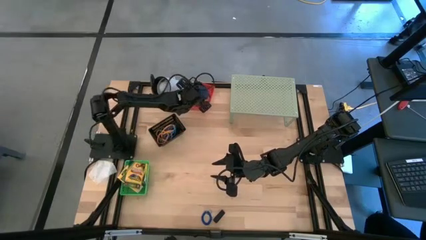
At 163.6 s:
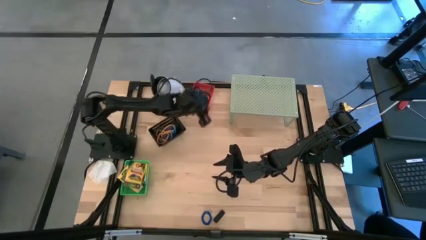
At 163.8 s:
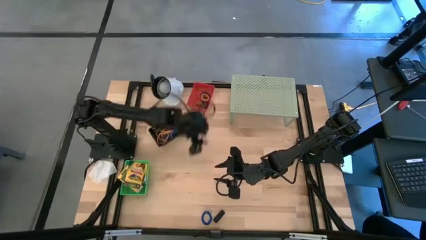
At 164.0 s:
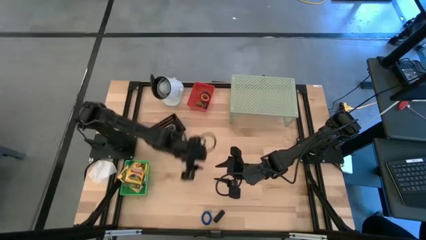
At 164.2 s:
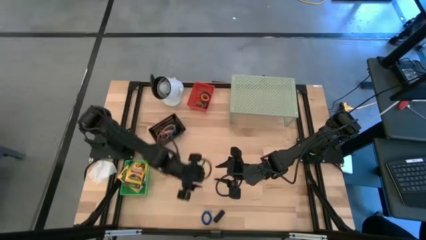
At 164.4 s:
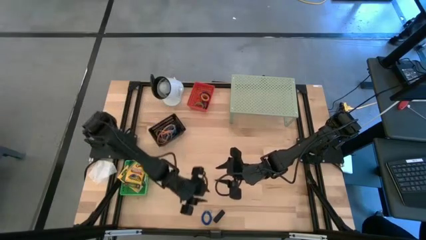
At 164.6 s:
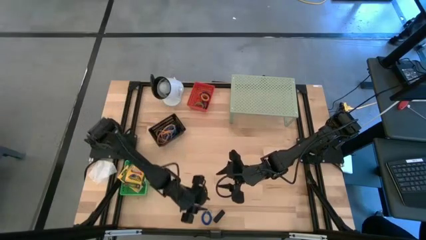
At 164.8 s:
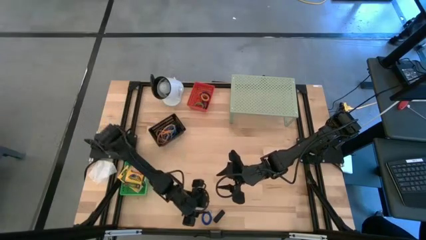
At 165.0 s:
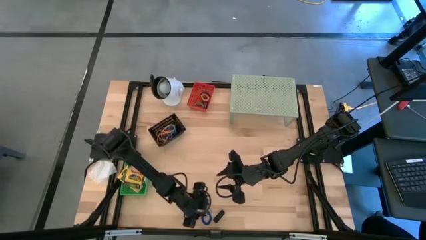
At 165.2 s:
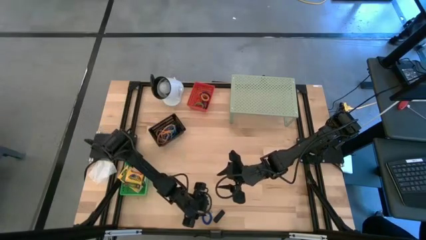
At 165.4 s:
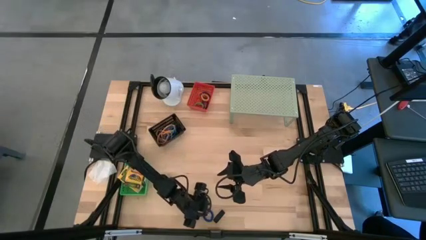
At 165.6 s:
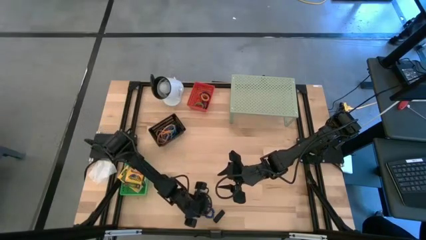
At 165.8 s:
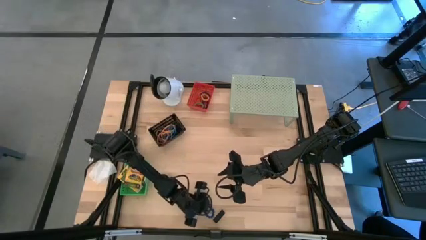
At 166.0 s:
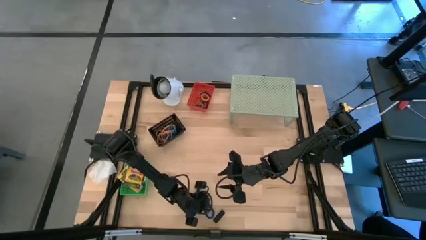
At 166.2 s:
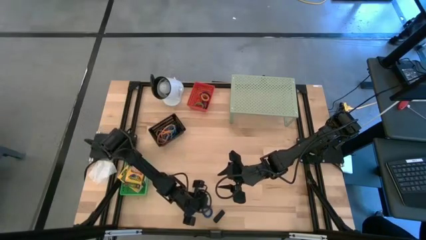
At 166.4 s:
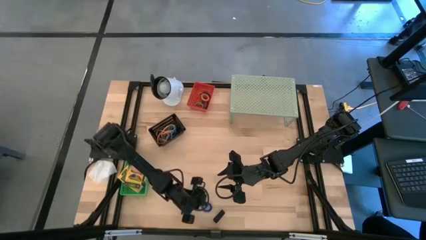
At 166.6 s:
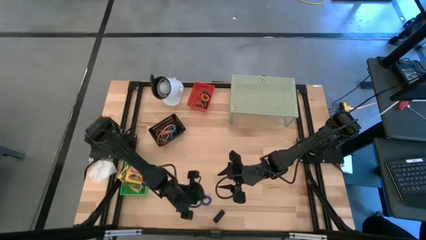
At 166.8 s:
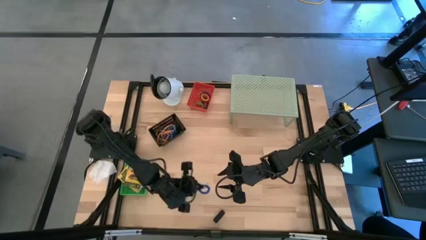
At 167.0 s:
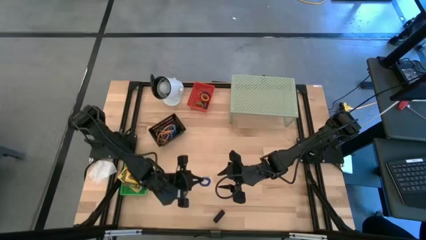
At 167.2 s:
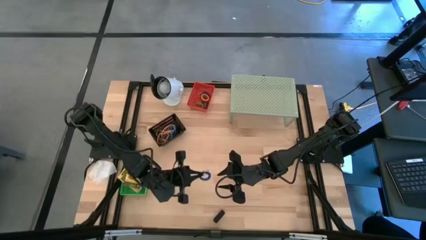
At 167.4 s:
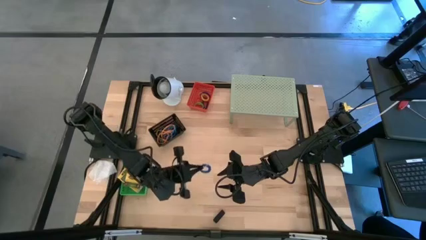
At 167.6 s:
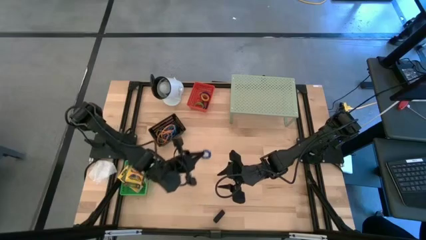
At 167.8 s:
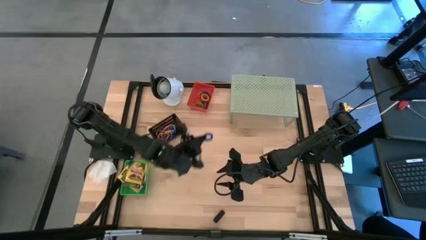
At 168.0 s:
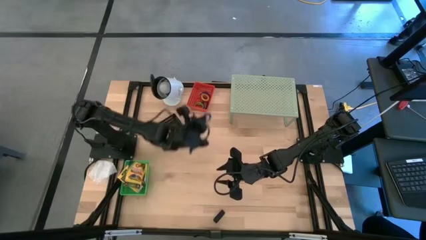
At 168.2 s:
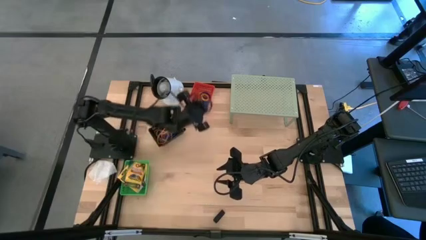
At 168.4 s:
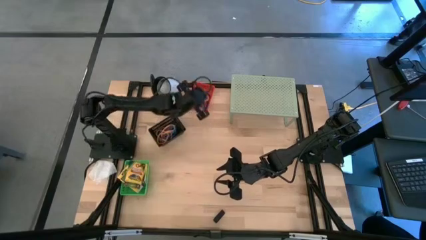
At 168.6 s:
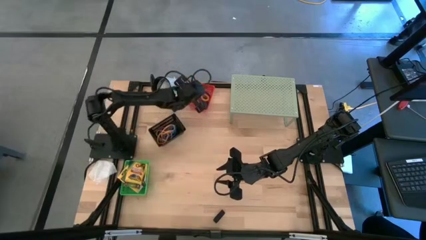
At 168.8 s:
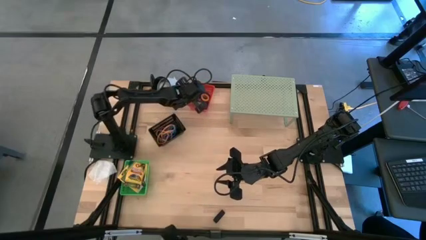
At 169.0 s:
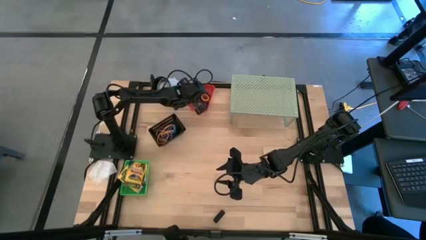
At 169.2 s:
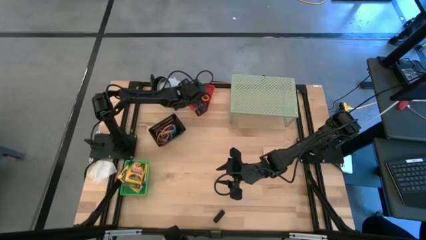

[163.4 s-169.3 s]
Task: Pick & Place Office Desk Supplies
Put the blue spring keychain into the red bin

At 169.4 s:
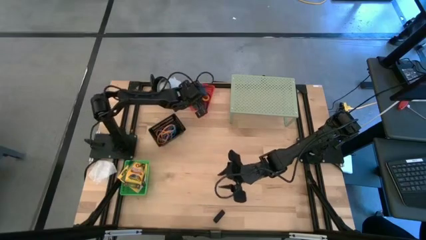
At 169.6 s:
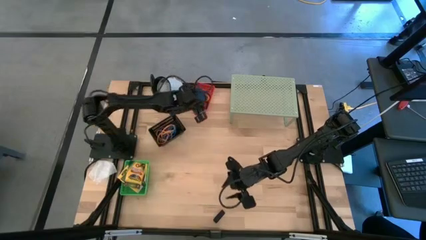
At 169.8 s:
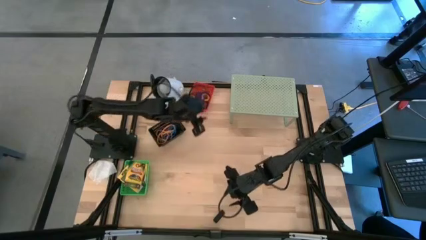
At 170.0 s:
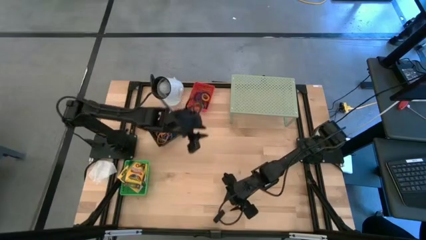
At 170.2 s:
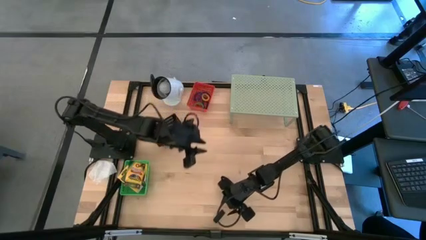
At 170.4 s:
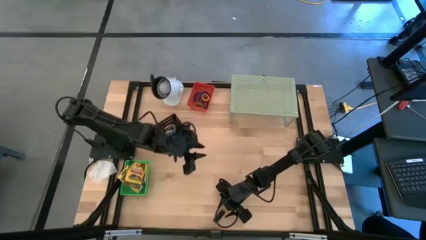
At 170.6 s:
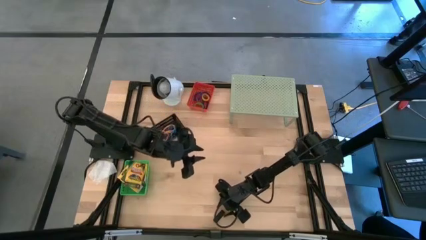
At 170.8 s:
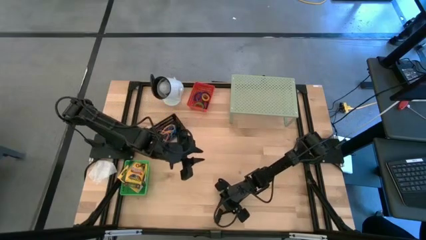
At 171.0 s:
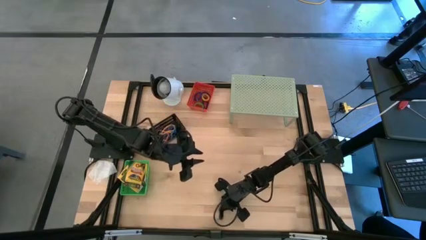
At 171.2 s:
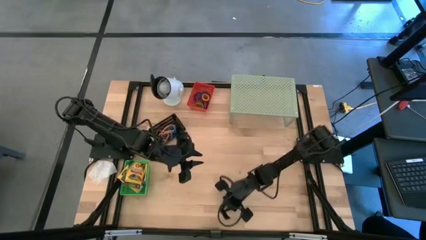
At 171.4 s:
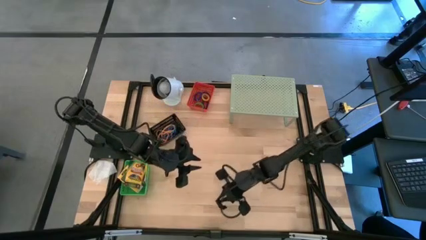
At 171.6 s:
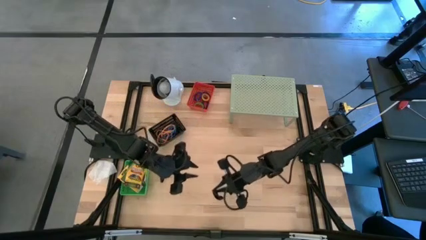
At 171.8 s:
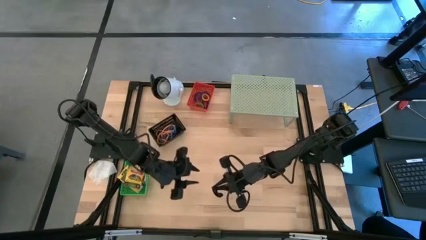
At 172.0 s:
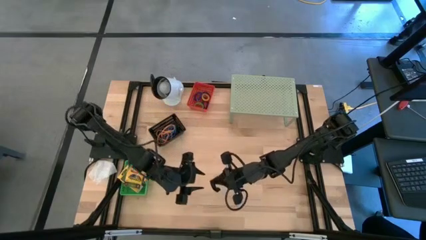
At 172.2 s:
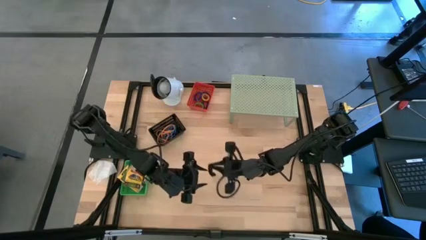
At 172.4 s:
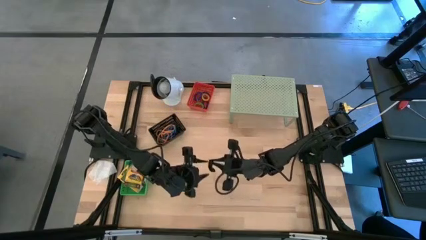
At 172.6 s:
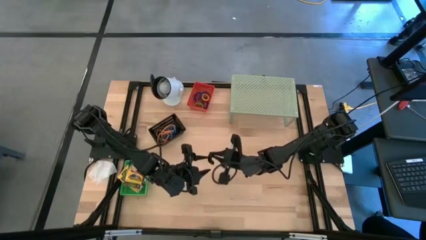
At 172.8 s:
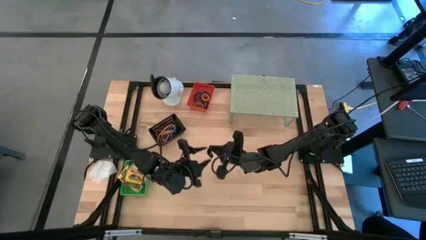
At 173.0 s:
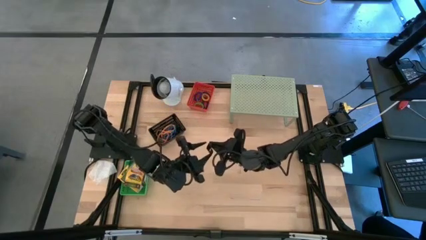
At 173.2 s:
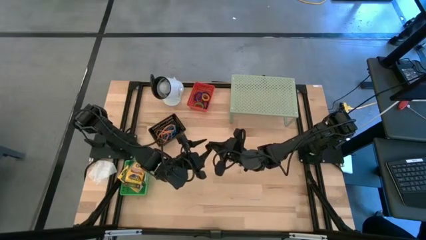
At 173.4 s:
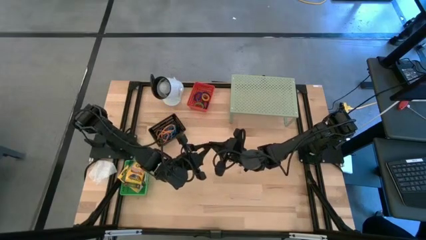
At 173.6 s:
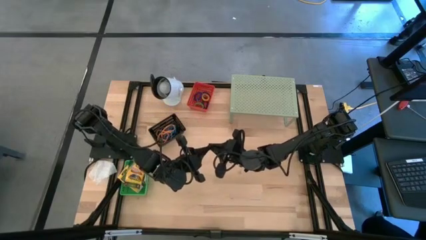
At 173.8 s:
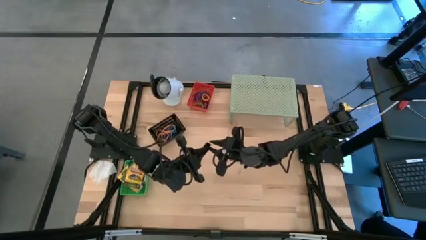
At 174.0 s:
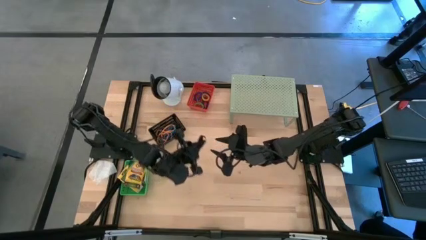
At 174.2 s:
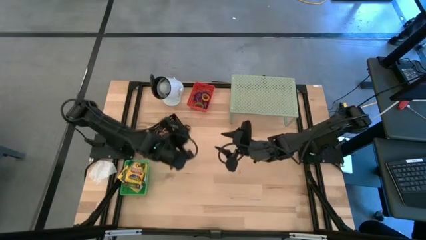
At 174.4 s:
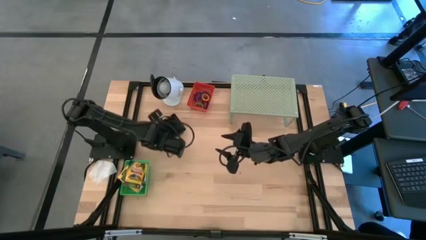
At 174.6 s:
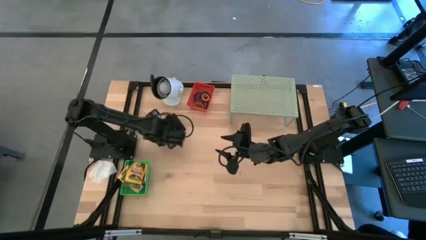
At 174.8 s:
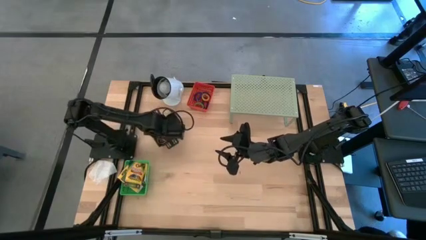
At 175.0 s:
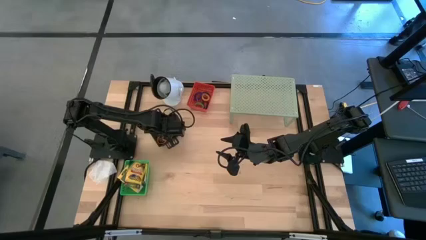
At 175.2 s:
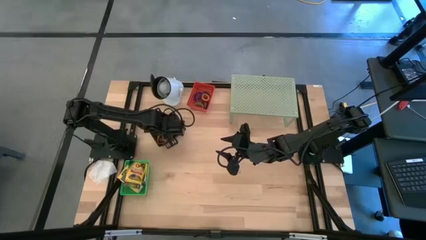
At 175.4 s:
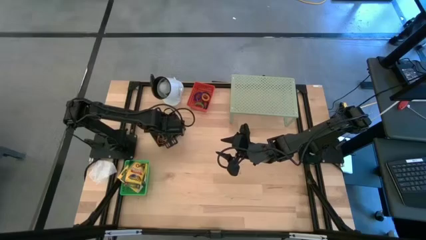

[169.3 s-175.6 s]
Put the black rubber band into the black bin

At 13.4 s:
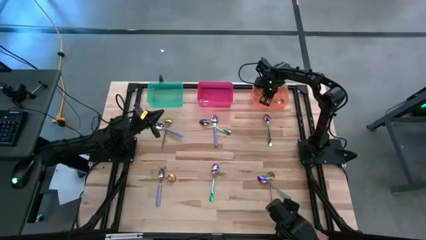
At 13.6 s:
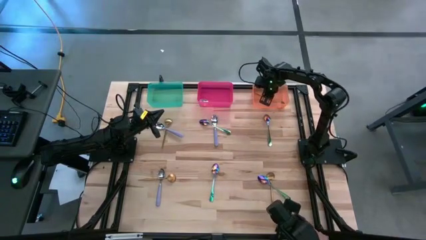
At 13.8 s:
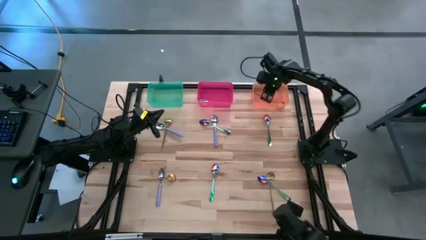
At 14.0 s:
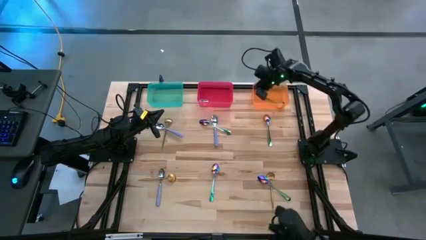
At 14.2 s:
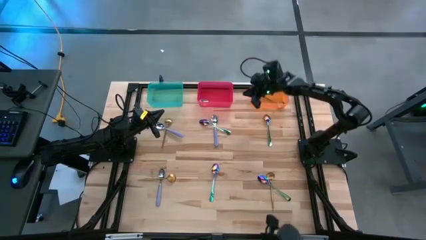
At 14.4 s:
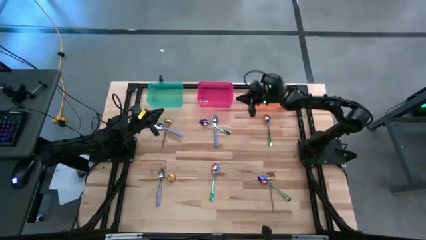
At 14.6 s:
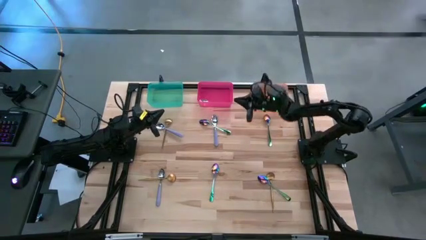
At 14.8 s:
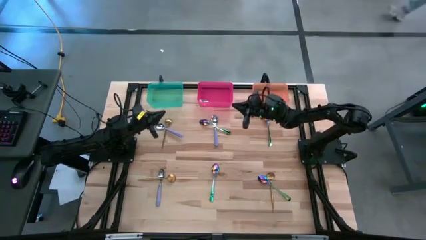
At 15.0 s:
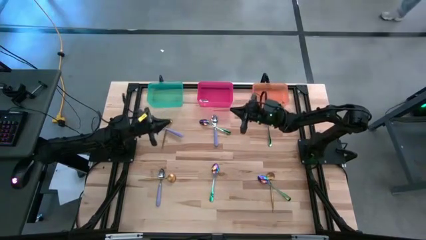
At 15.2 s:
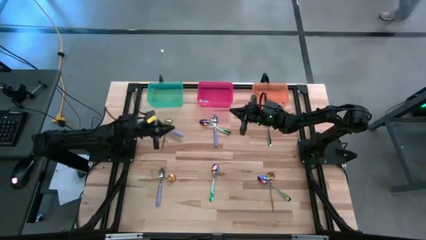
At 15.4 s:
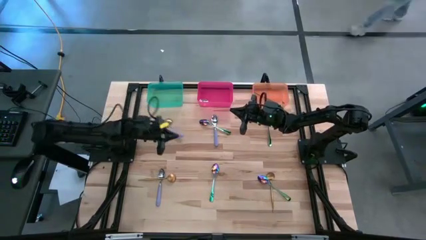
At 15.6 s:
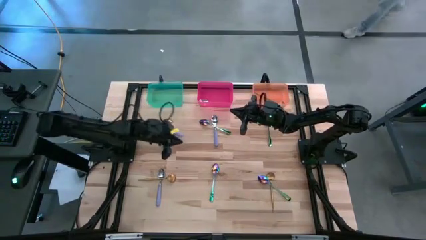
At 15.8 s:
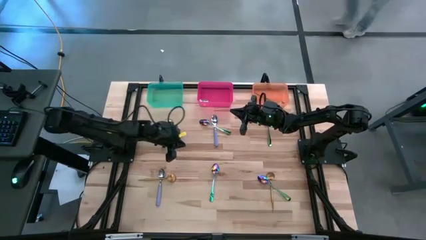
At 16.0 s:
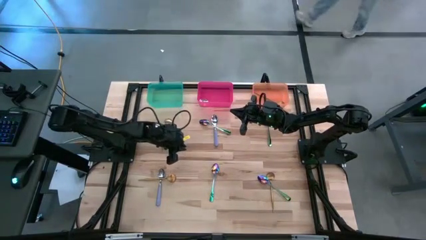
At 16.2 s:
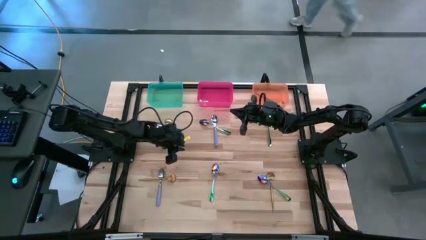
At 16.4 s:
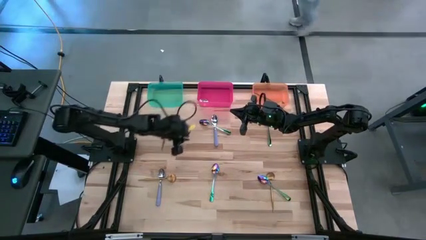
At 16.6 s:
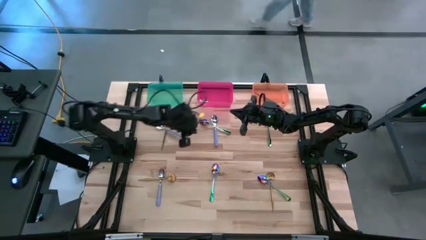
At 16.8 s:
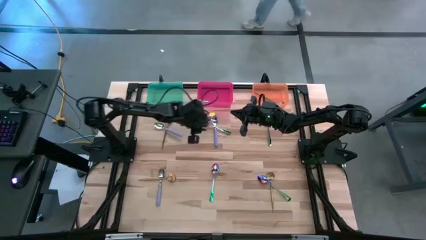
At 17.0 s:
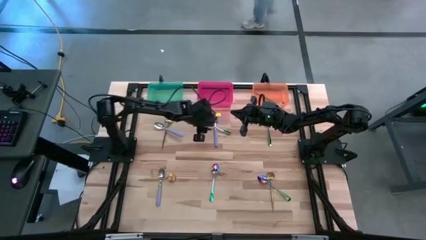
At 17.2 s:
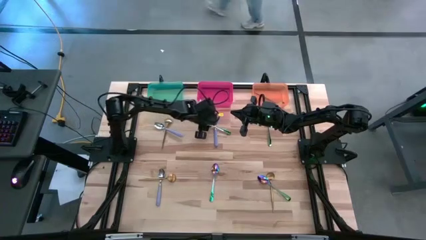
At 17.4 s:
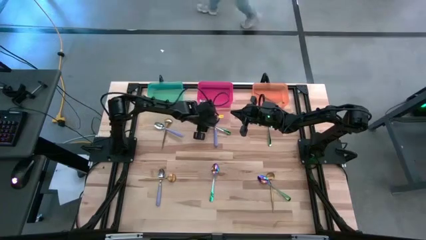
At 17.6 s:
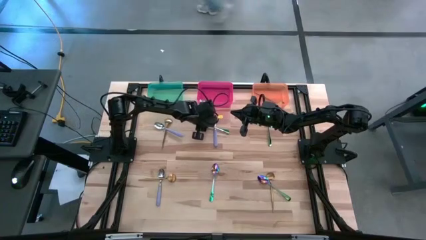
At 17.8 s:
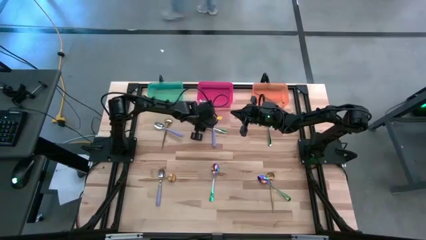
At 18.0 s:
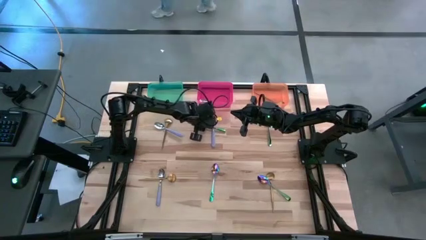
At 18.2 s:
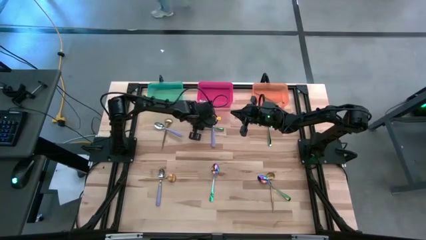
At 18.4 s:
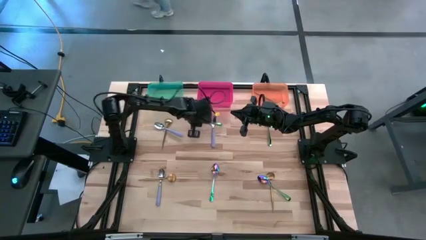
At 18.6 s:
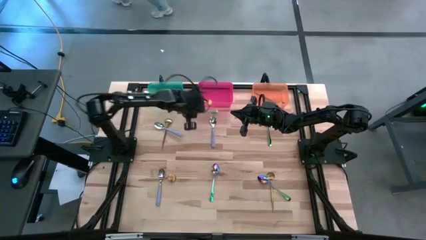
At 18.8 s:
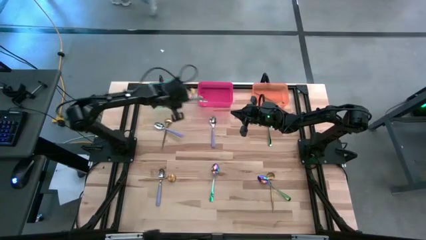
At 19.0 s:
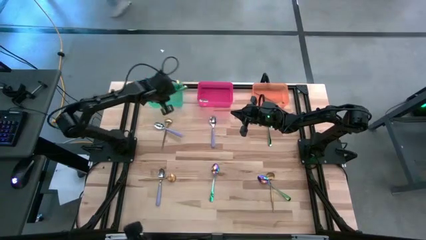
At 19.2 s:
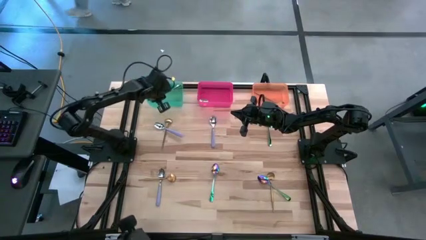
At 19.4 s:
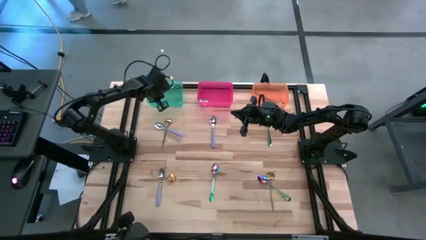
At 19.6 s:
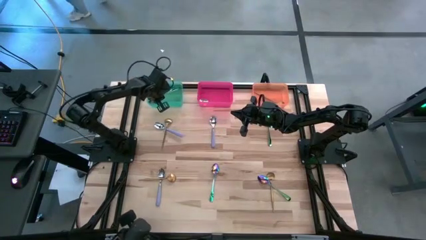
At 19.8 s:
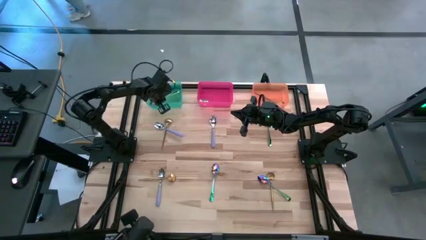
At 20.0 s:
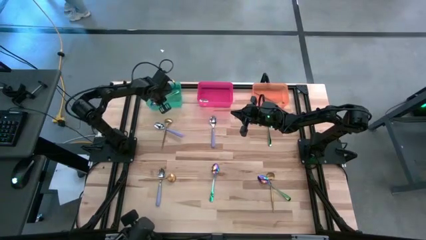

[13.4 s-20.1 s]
Task: Sort silverware by color (type)
Put the blue spoon into the green bin
